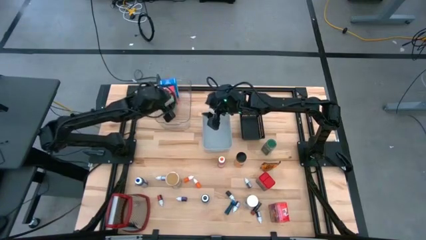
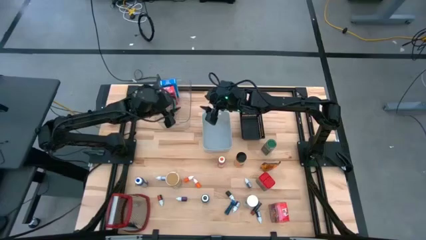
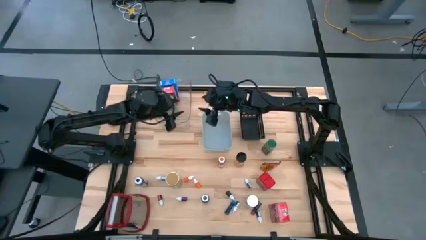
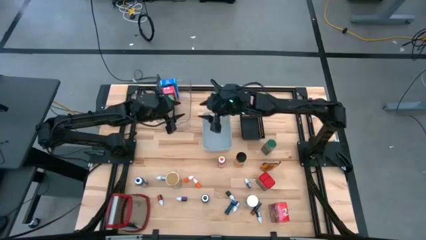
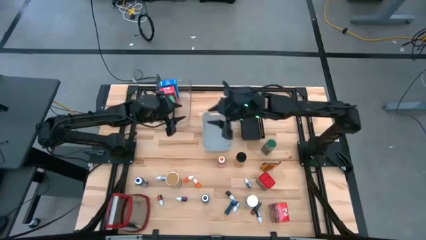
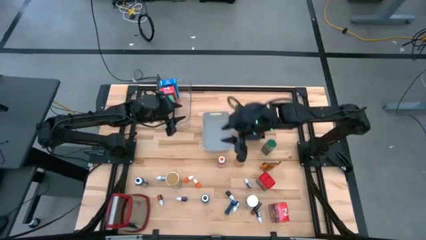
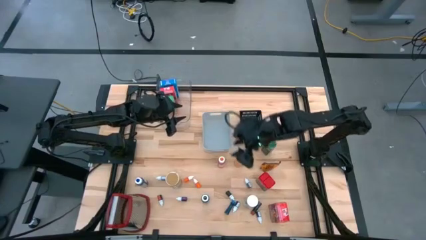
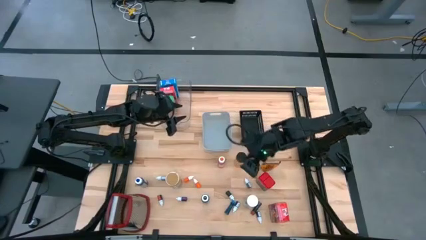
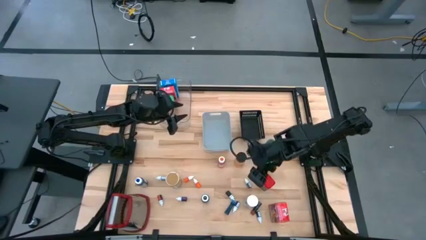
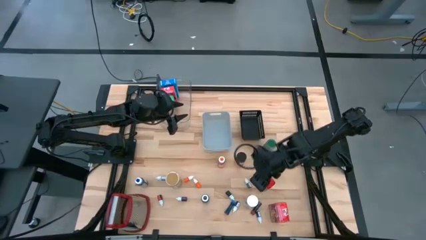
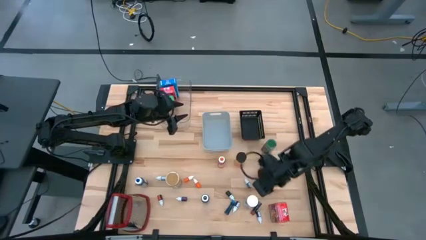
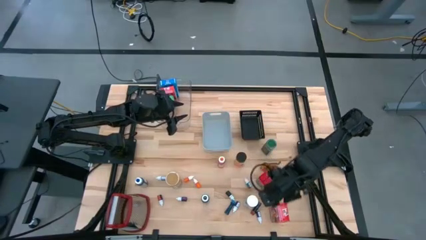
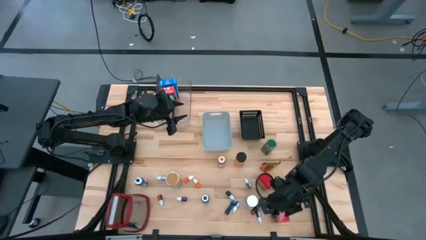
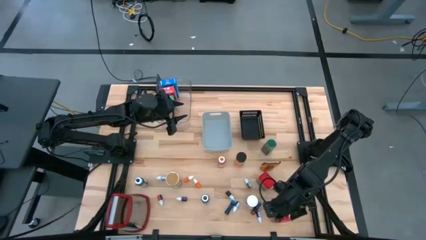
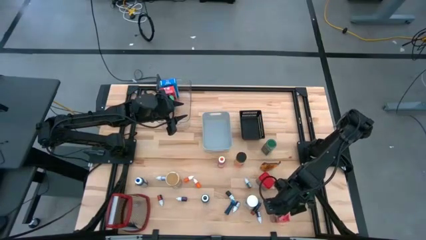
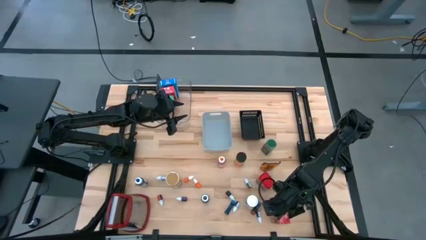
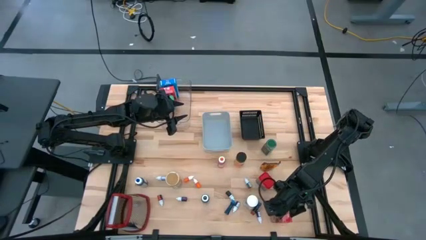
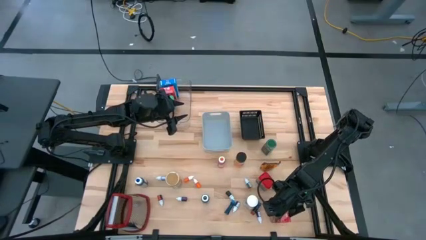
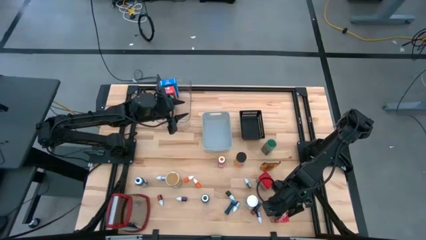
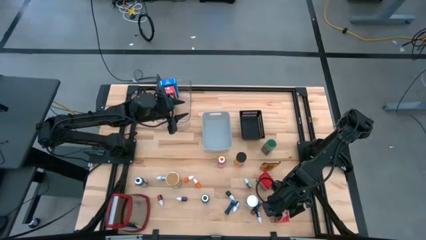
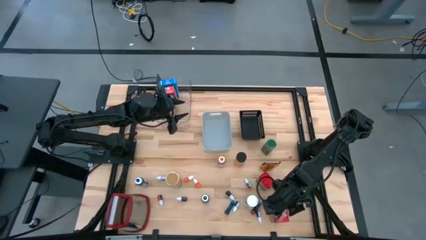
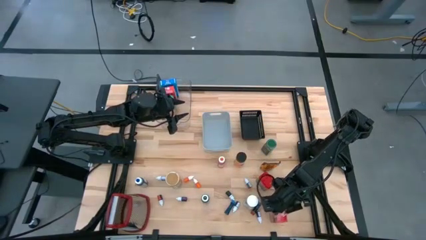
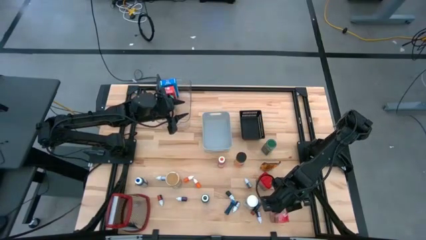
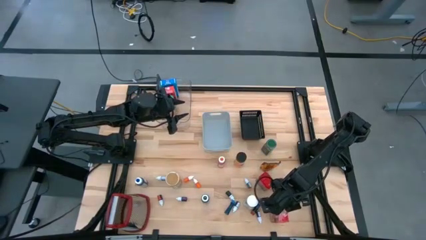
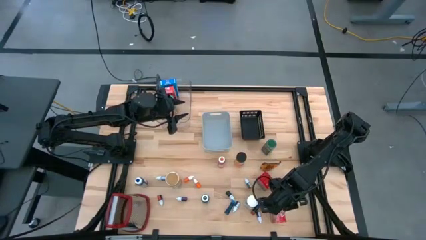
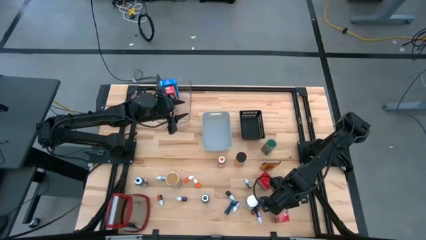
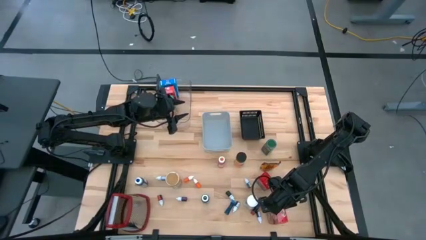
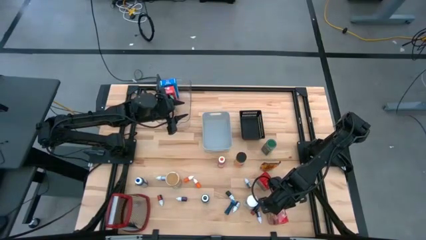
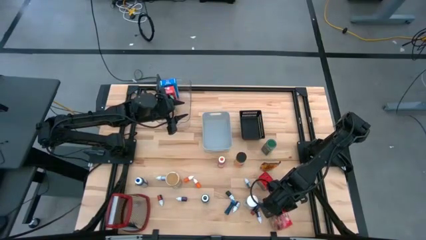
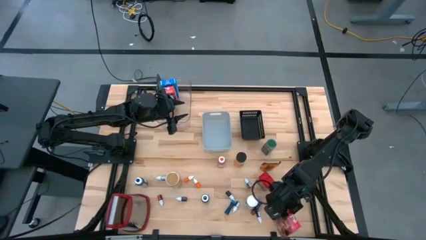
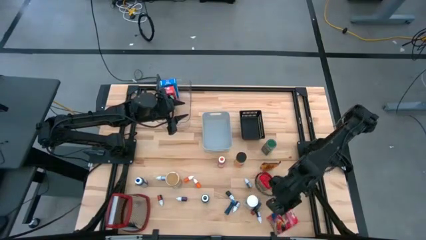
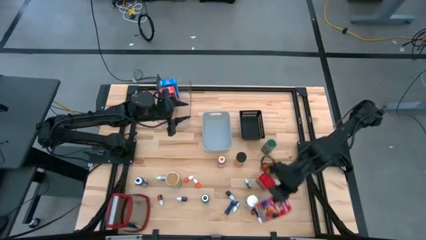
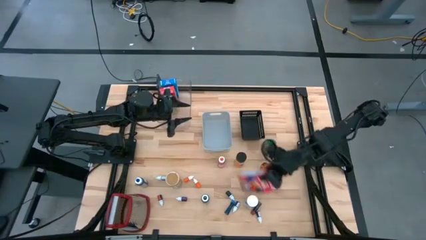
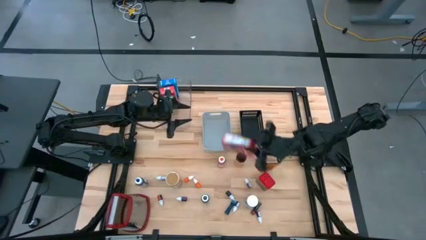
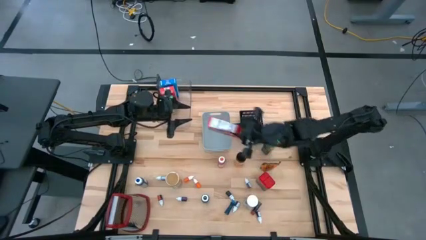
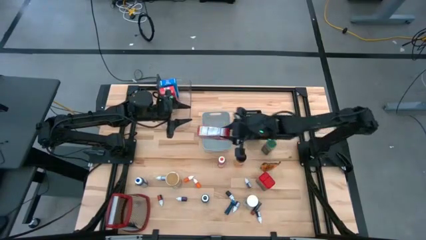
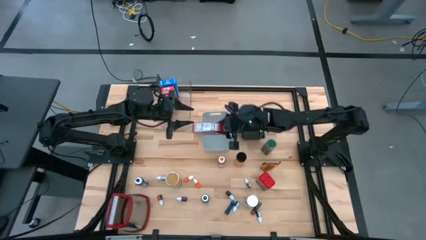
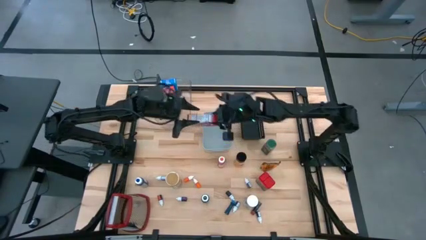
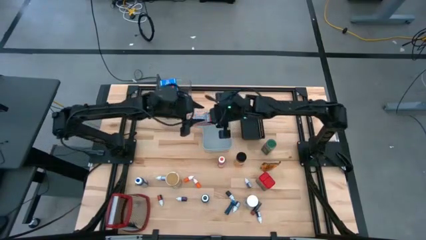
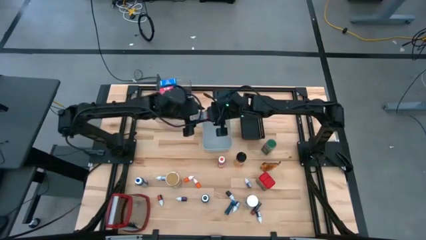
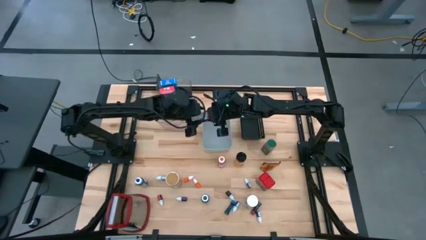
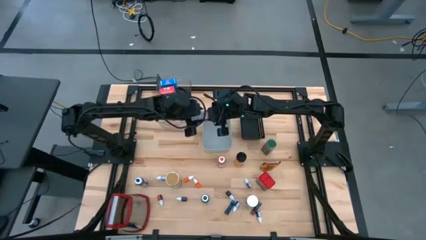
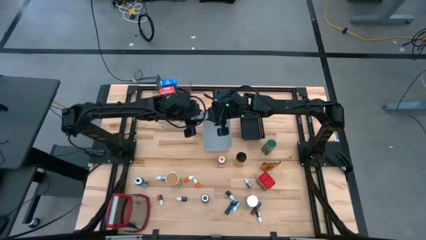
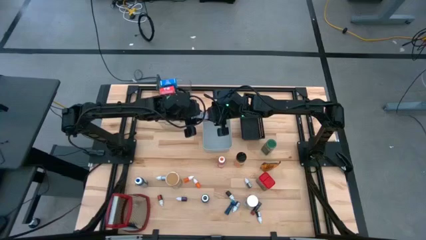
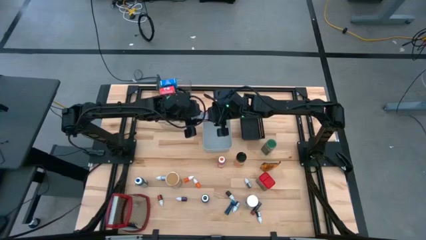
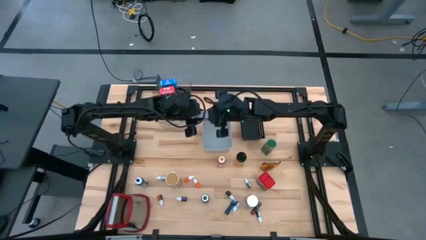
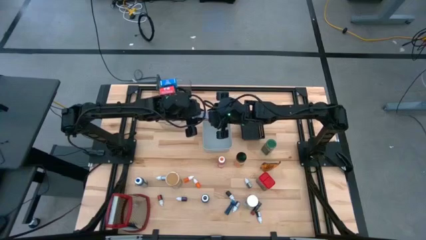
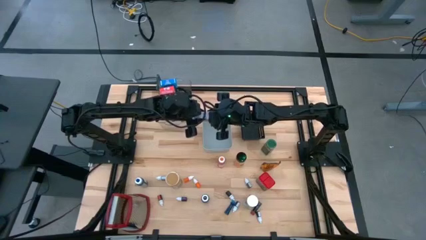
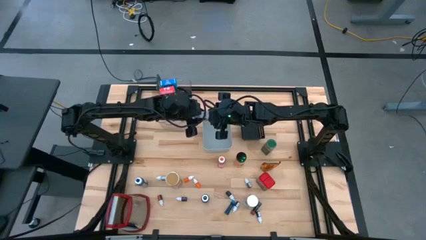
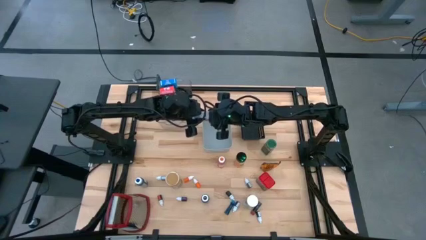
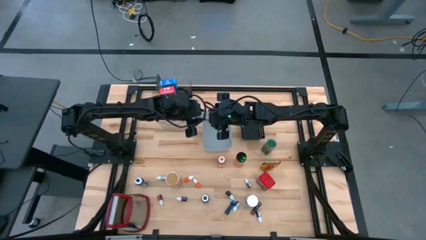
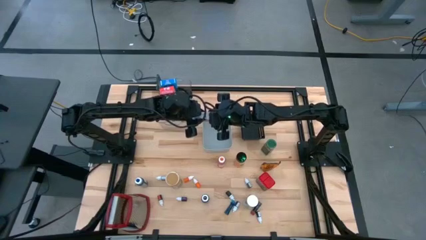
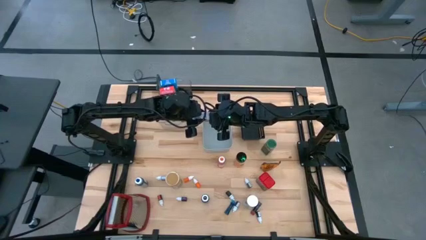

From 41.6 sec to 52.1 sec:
Task: Pick & Place Kitchen Items
Put the right red cereal box into the transparent bin

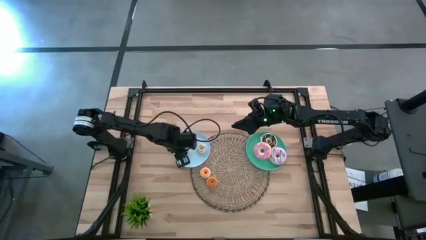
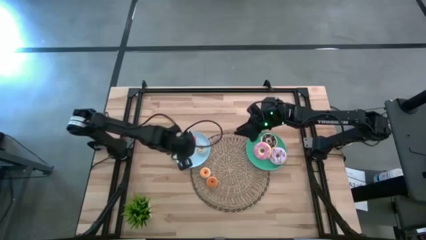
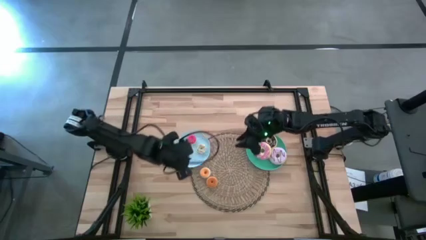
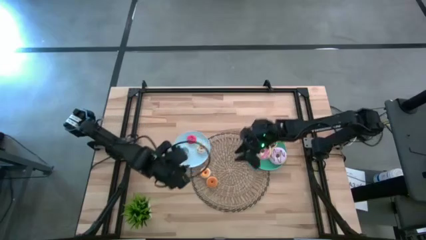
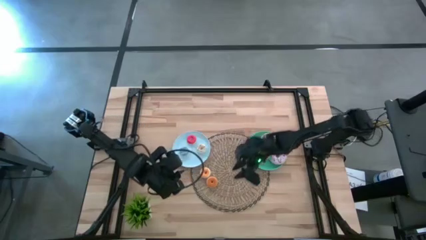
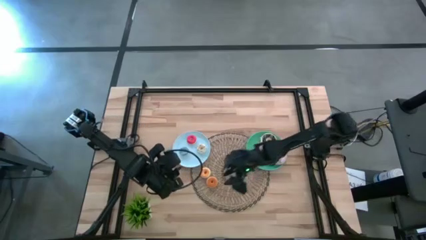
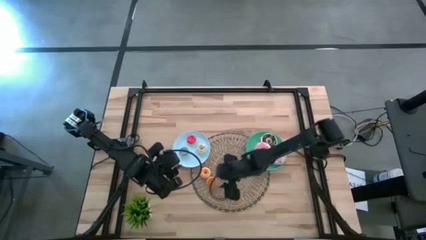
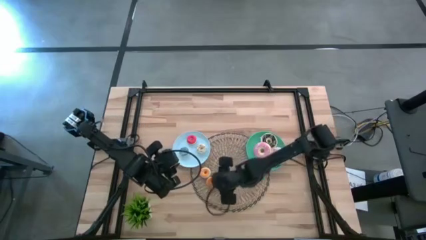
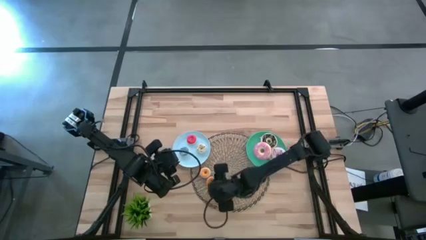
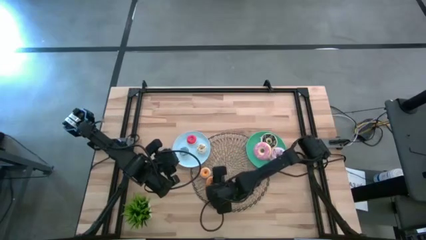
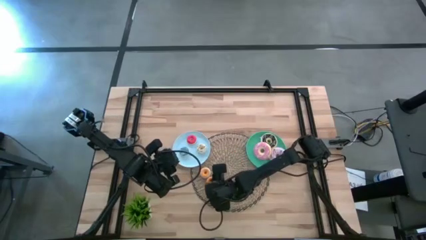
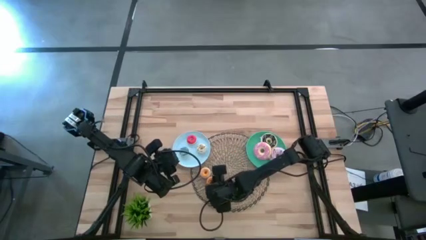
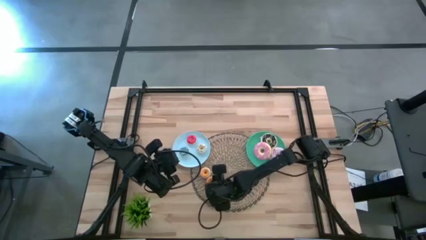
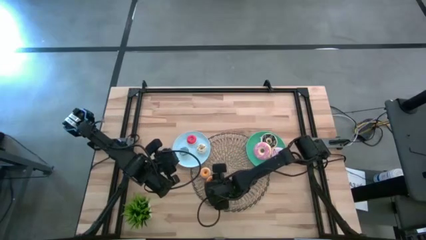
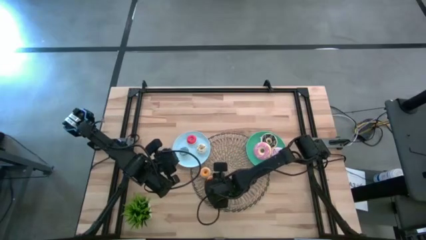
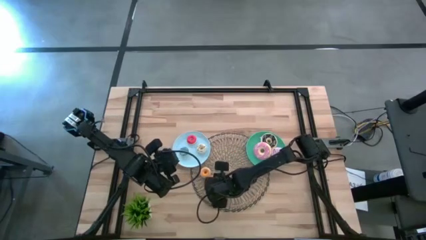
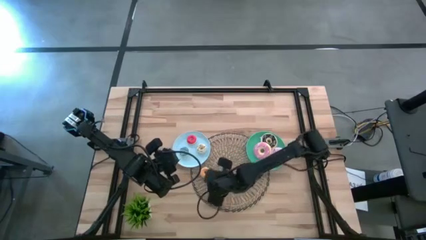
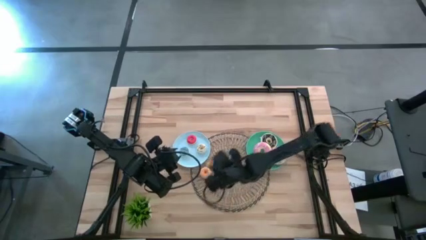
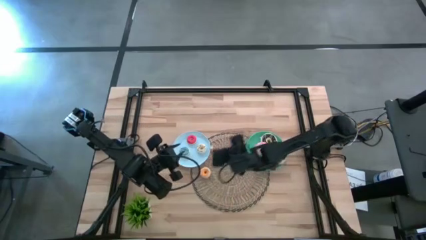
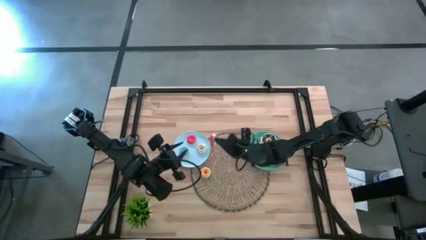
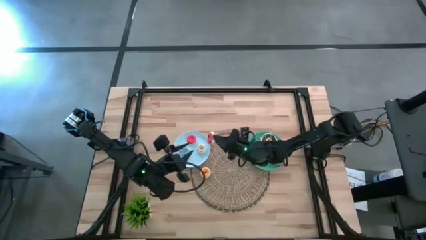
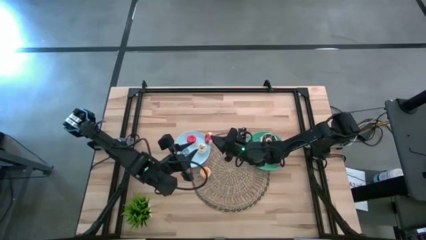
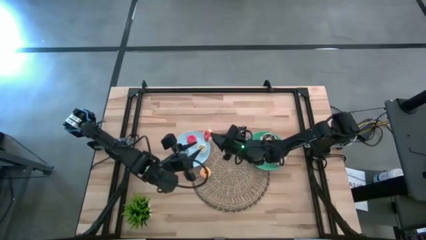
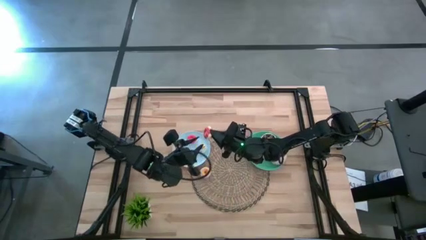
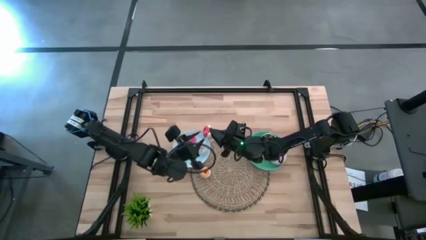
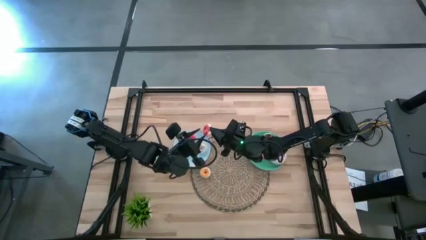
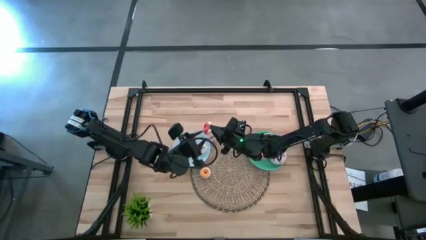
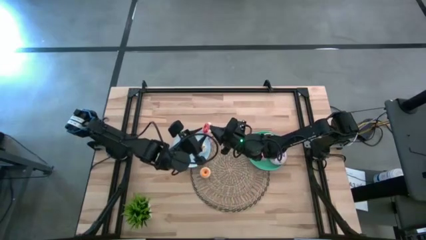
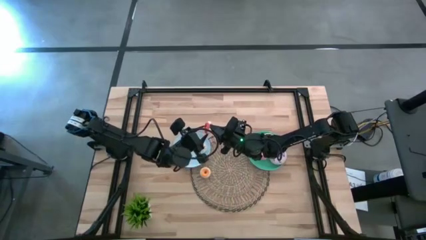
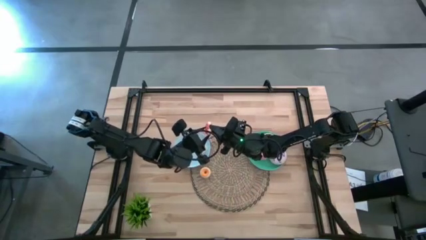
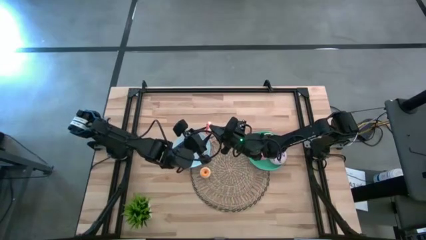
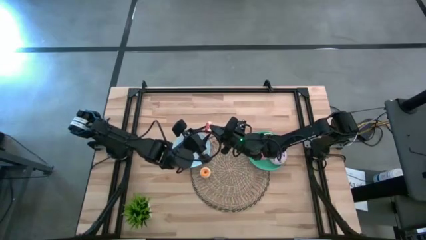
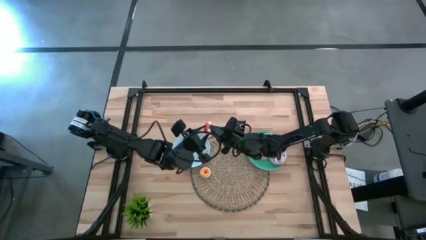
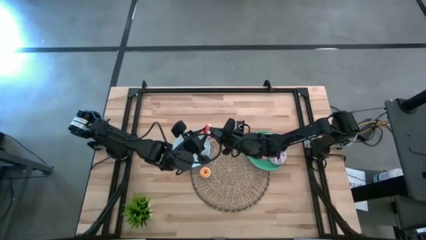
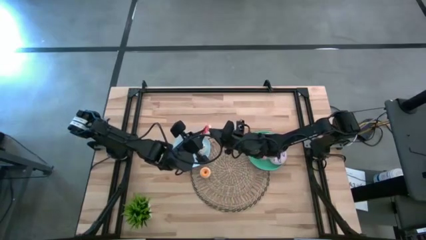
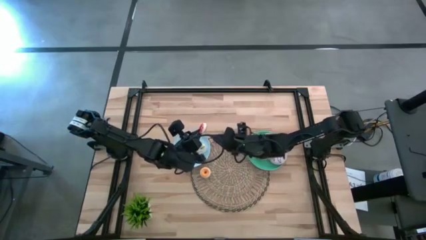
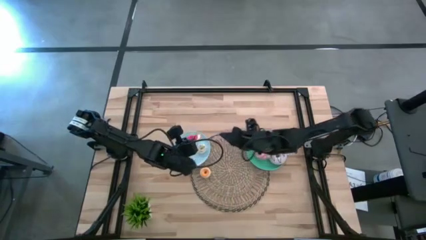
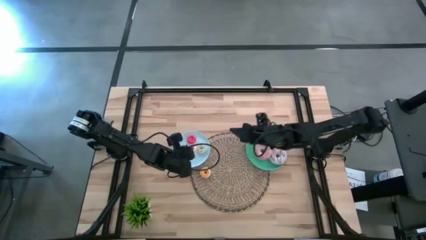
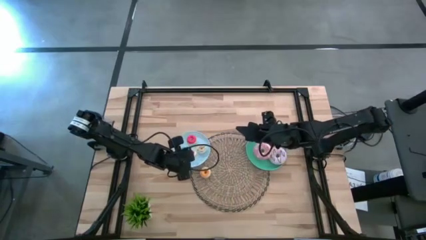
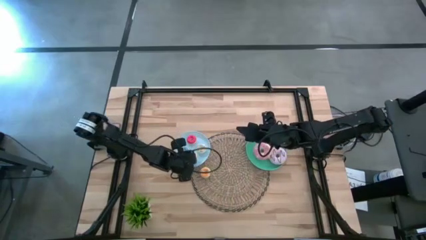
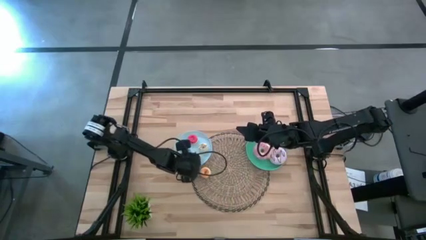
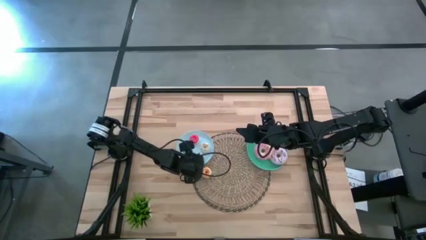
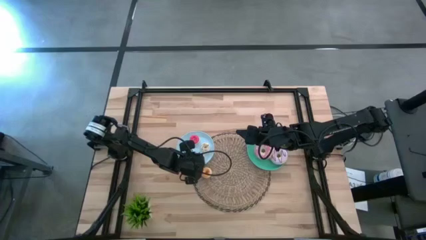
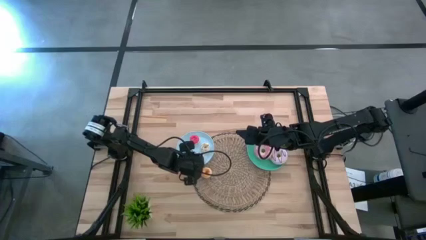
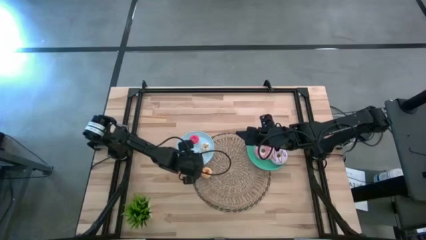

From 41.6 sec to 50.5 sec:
Task: Pick & Place donuts
Put the small red donut on the blue plate
